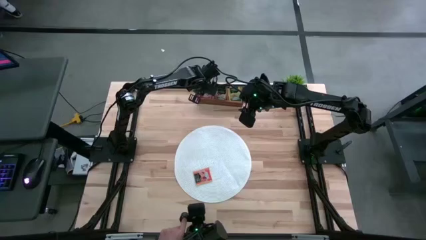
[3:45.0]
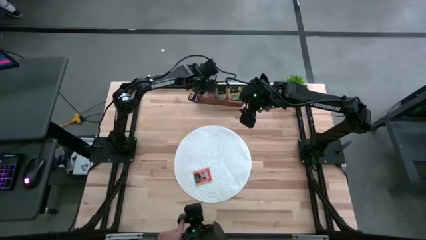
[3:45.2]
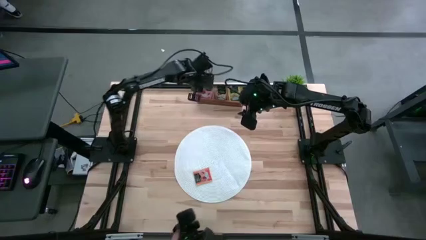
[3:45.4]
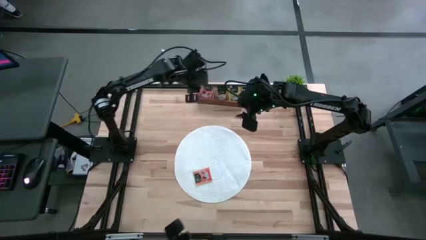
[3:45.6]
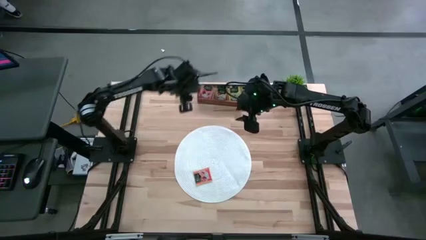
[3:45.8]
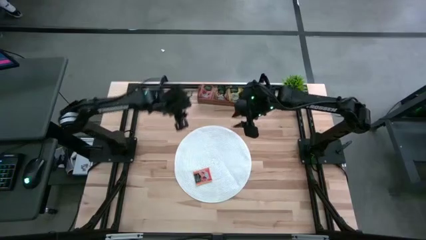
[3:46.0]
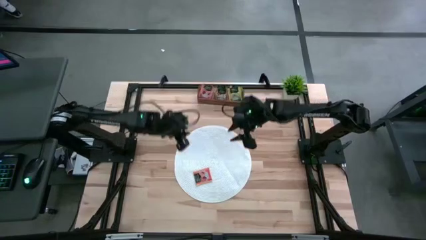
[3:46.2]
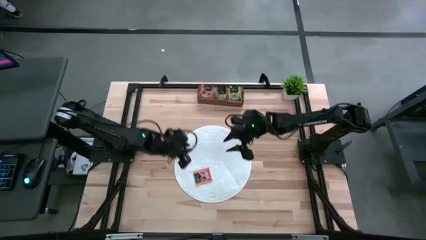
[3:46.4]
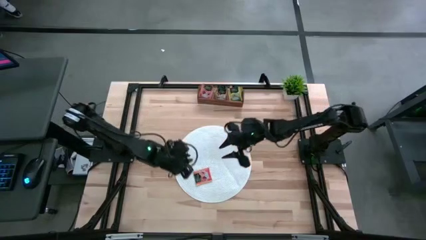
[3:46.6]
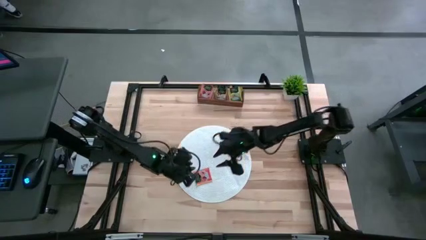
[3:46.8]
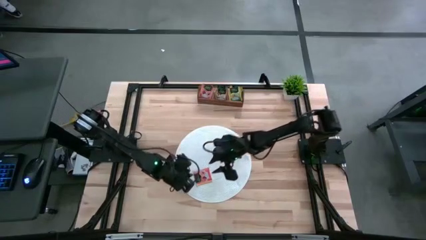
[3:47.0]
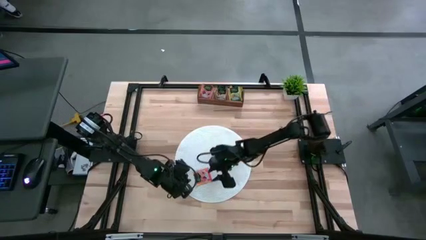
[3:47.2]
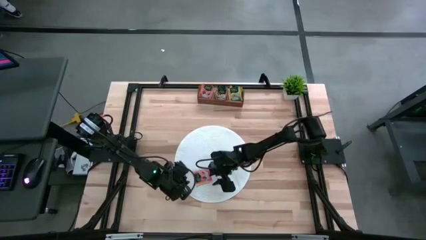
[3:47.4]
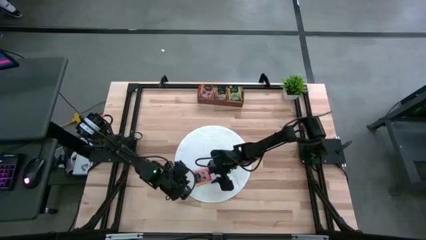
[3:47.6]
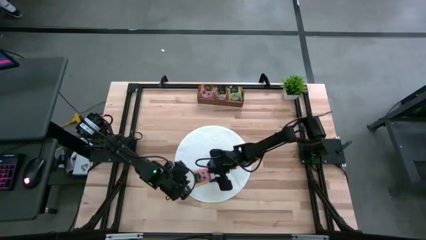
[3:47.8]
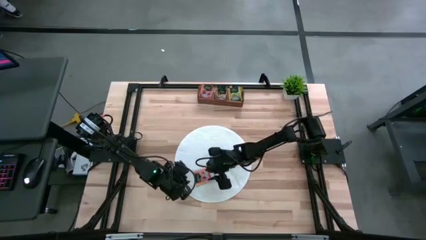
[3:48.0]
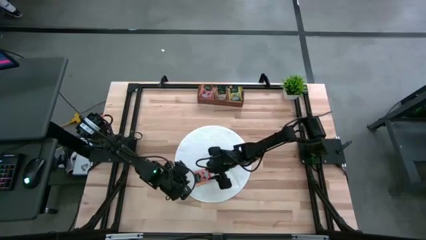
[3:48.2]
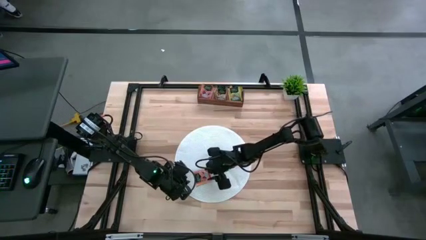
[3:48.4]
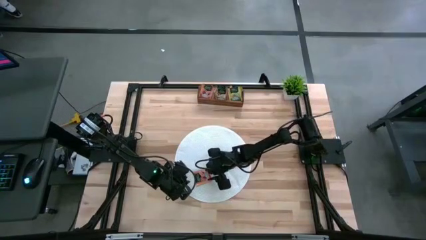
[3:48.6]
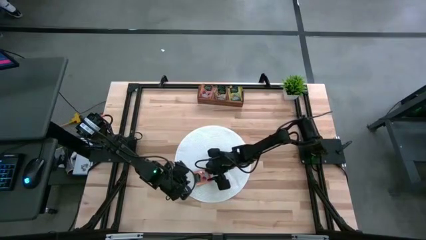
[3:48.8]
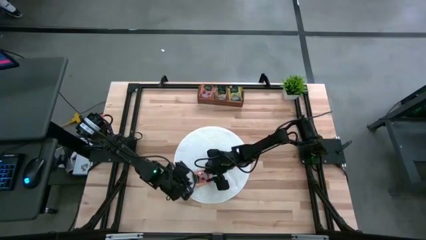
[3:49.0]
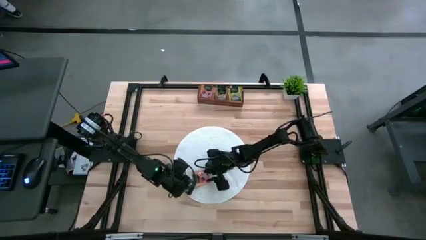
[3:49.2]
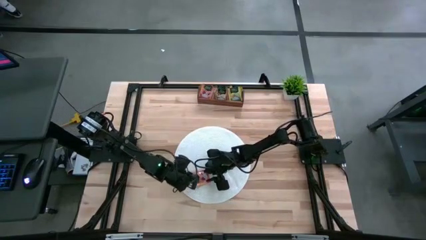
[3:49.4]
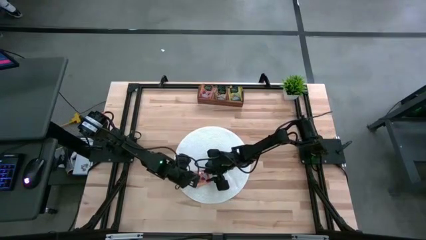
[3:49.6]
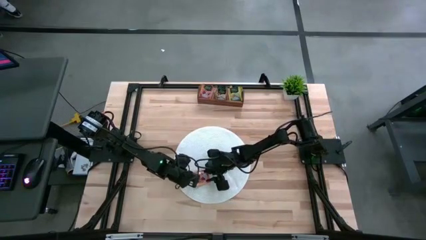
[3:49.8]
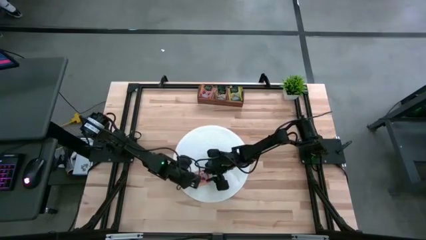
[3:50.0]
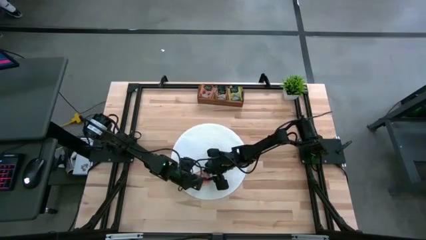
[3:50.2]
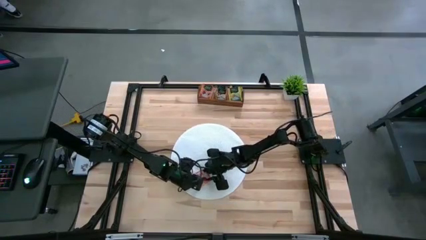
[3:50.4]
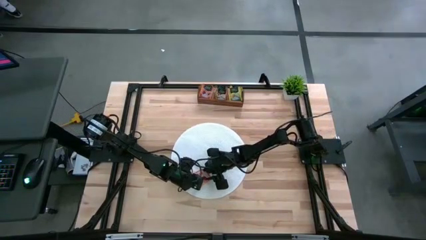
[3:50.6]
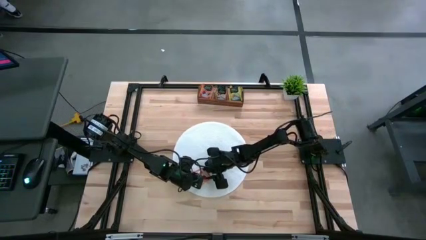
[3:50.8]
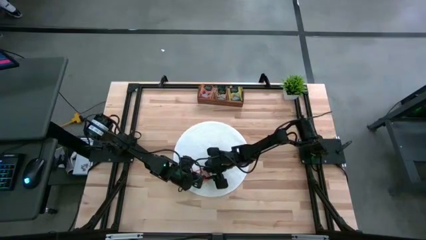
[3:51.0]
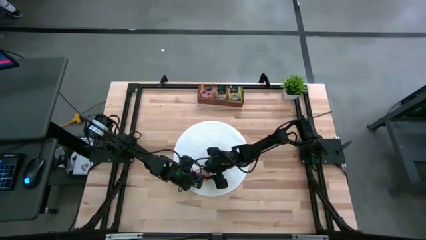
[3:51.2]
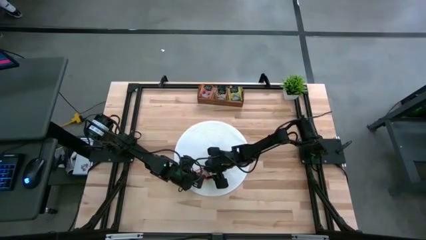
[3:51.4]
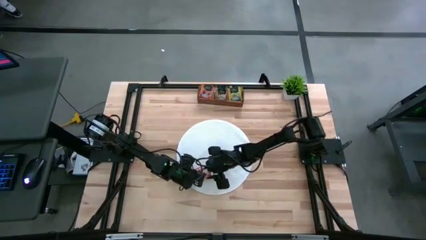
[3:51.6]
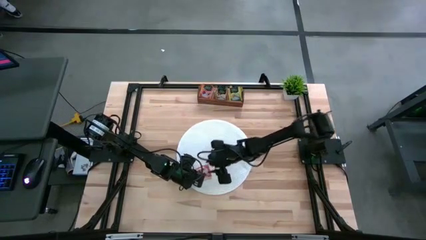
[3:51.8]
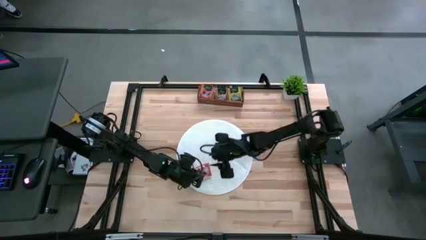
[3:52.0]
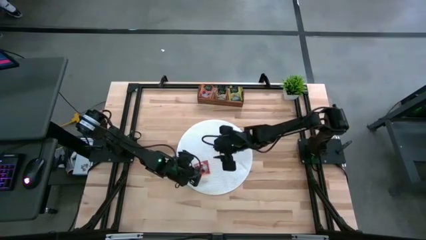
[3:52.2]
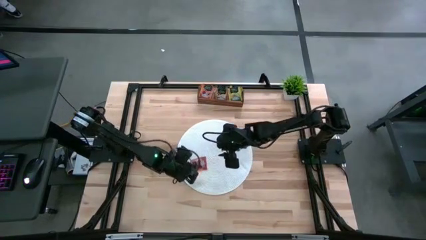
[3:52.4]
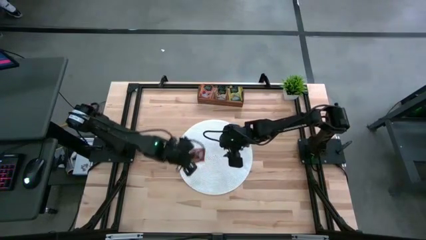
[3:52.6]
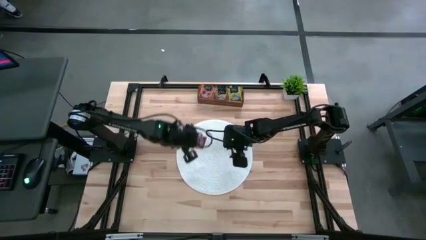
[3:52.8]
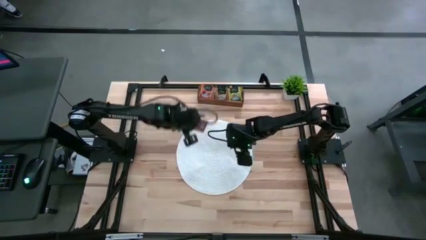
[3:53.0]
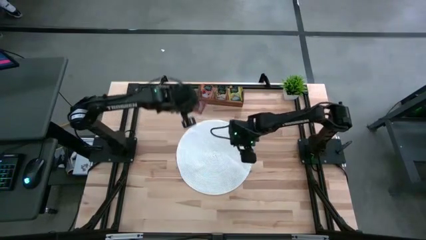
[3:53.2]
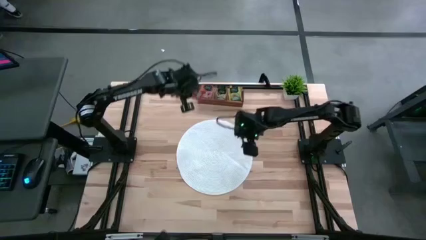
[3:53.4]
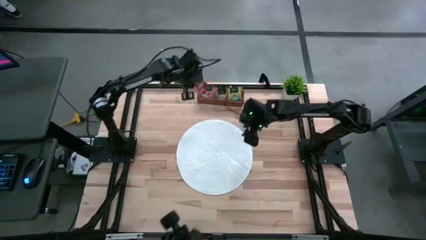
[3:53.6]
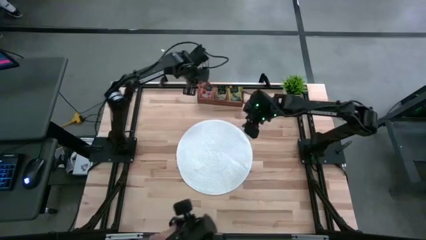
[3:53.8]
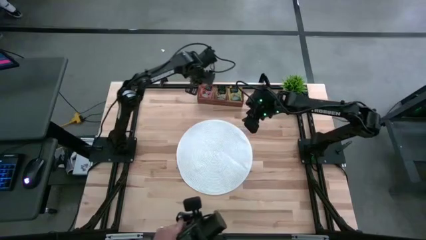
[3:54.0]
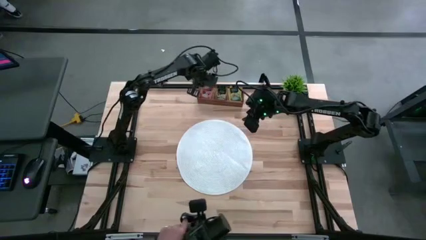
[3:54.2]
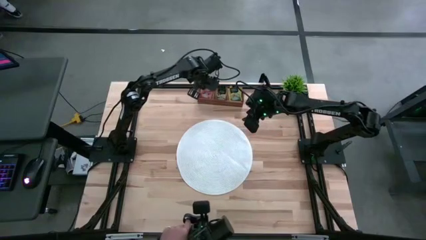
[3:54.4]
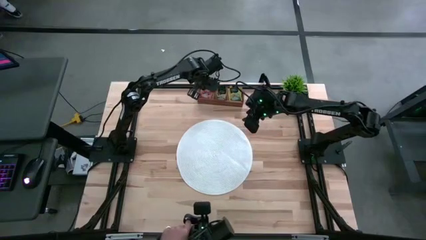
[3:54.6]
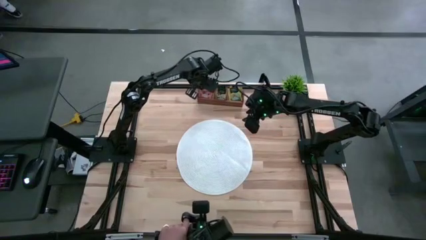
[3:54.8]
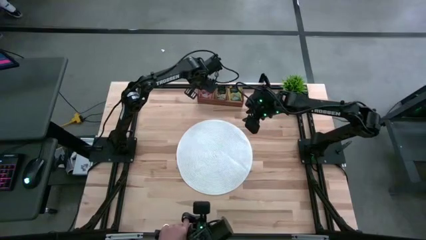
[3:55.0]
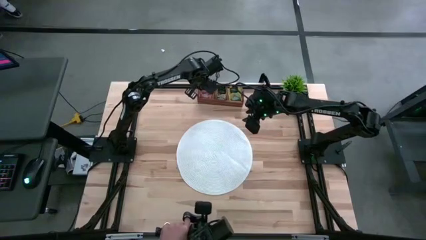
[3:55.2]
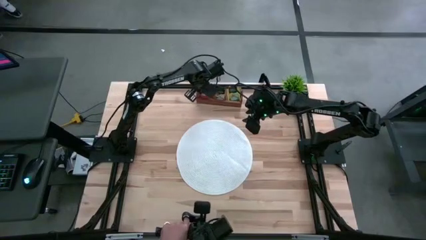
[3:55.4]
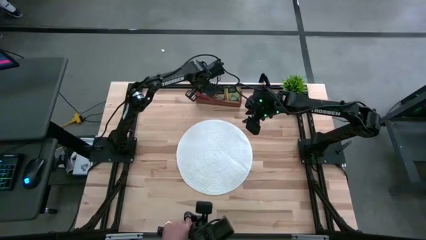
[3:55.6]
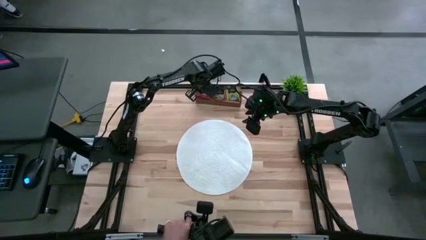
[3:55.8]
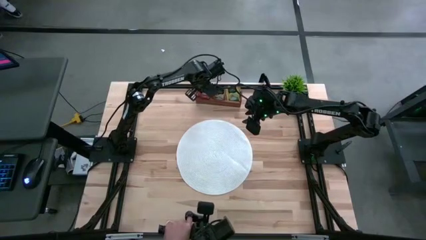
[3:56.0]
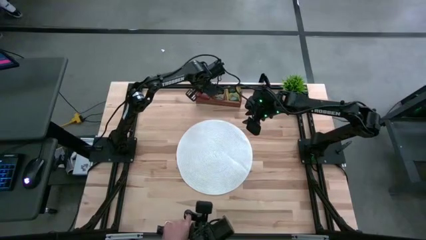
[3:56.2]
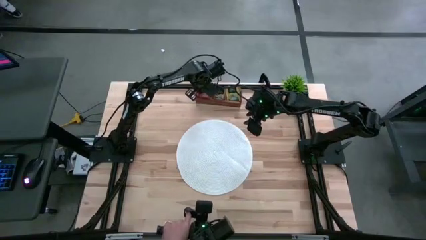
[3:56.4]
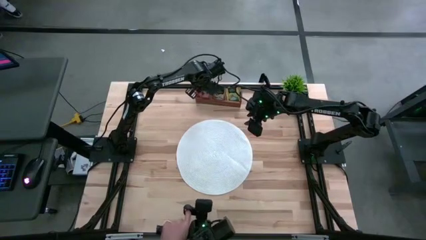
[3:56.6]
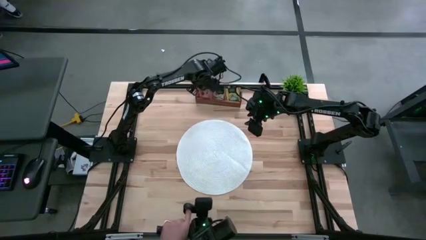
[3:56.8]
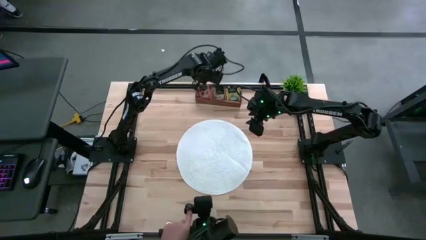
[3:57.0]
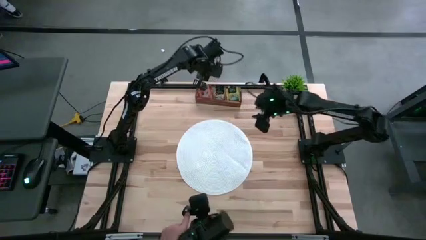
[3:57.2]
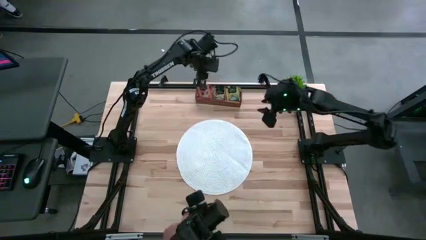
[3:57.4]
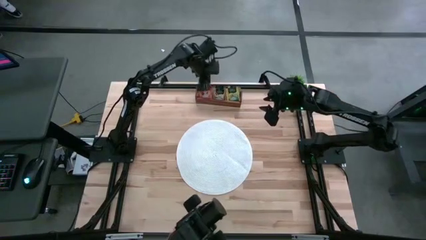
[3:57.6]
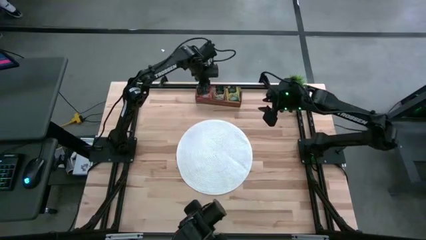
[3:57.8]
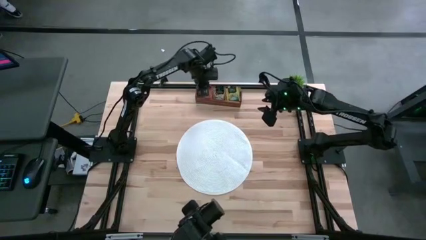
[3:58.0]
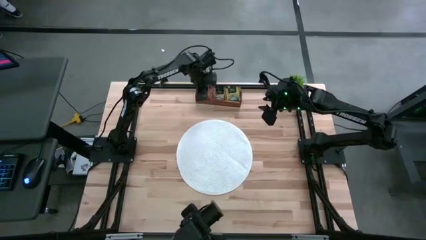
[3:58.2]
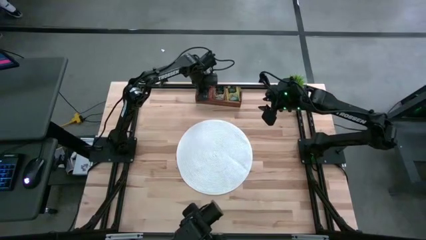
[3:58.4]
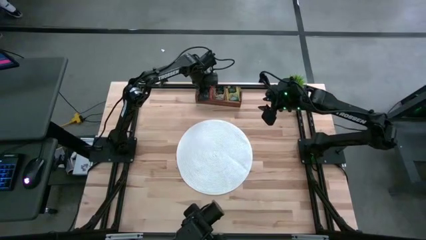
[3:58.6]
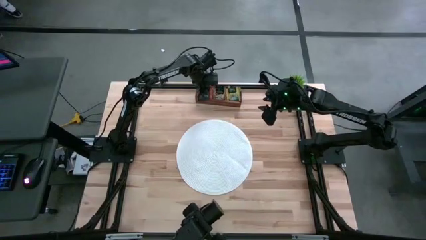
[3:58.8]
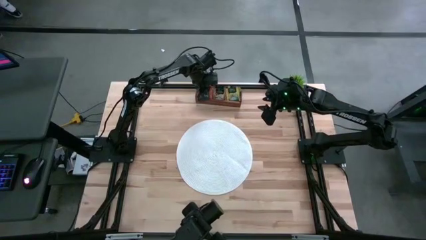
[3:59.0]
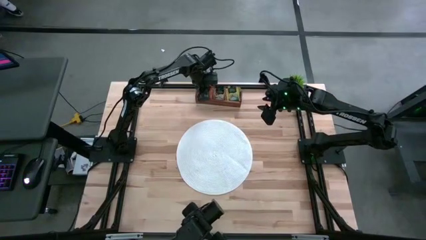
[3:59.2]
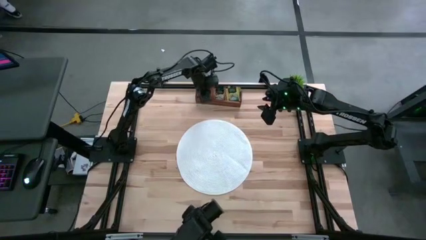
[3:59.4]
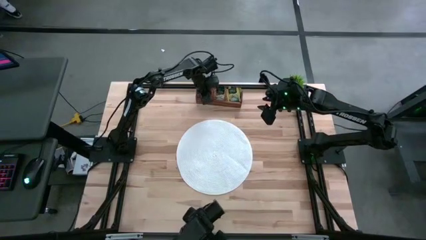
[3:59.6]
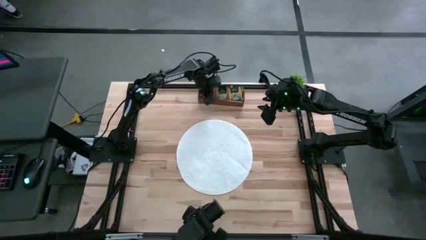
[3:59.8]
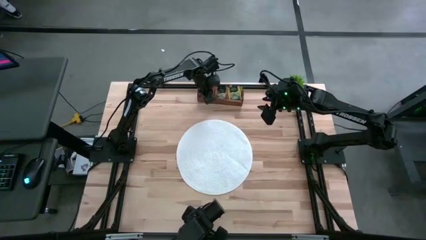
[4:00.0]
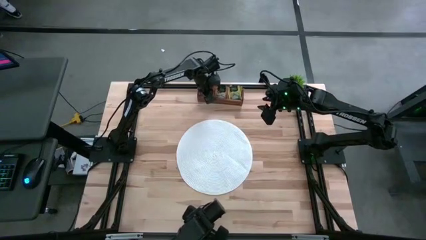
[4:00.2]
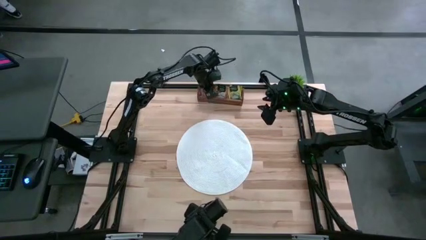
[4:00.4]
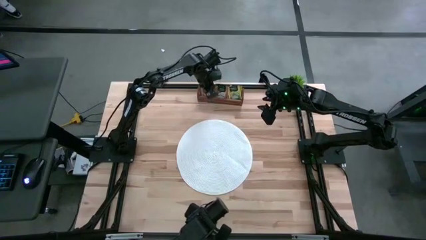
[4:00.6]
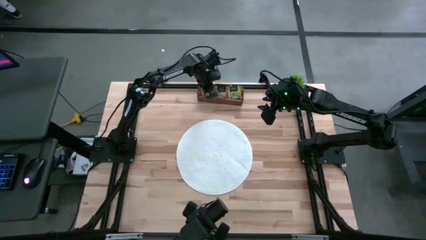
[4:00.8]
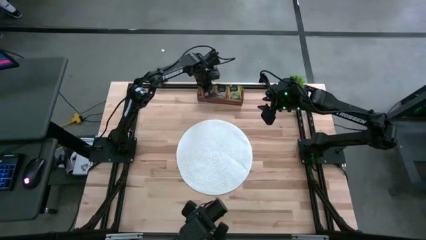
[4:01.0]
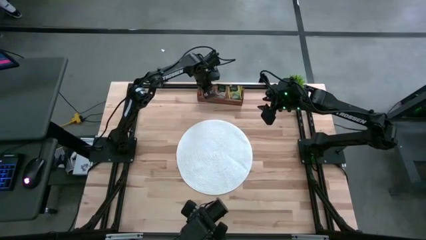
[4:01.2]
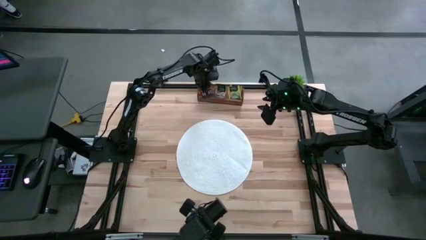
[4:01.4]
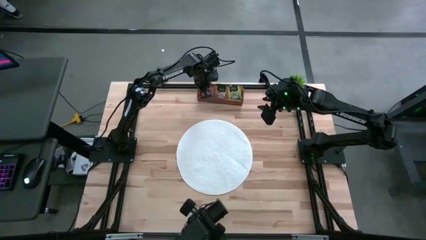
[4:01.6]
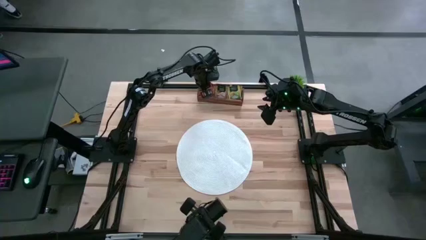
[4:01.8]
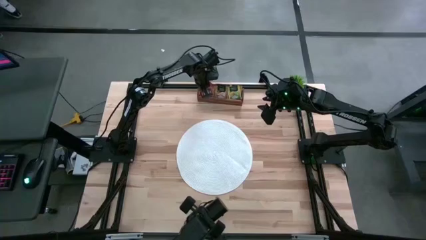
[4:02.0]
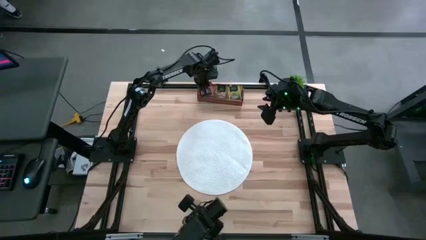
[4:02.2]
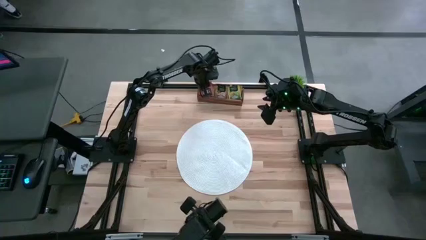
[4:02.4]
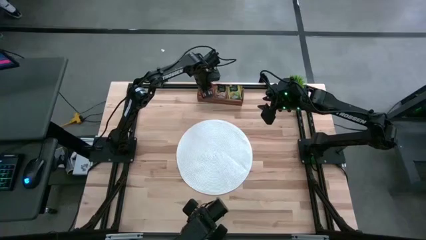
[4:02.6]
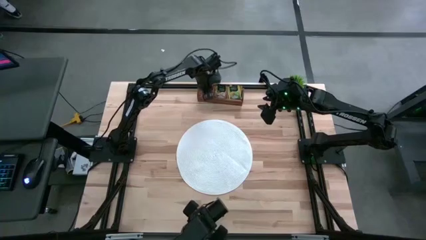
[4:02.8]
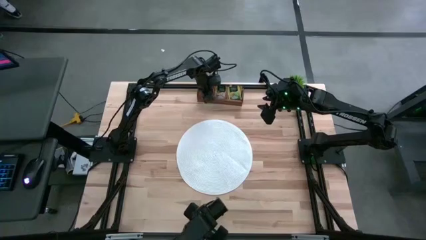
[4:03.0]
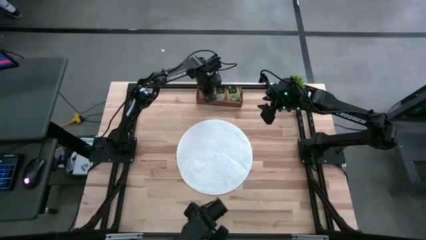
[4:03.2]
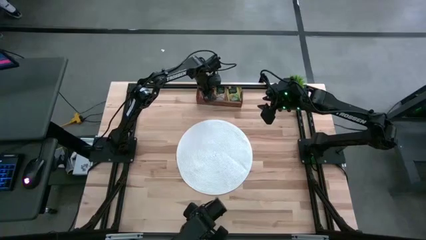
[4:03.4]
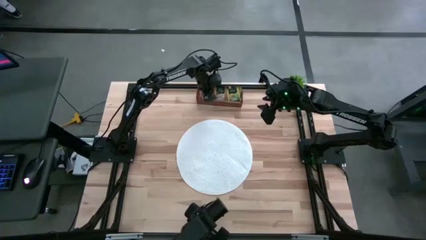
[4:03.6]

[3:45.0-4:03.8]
Task: Pick & Place Tea
Put the orange tea bag into the left section of the wooden organizer
